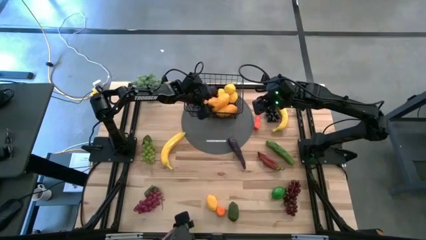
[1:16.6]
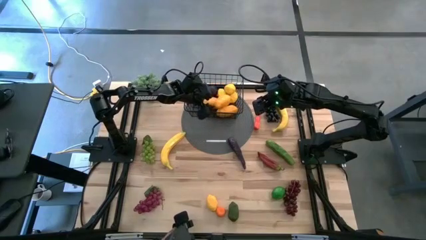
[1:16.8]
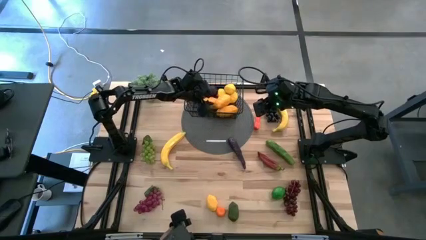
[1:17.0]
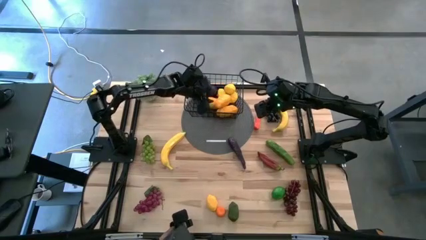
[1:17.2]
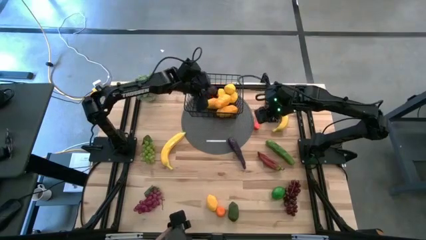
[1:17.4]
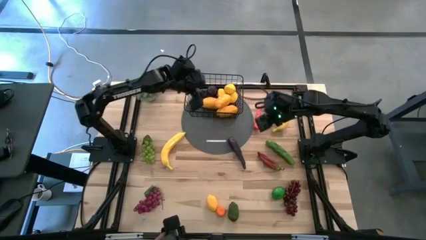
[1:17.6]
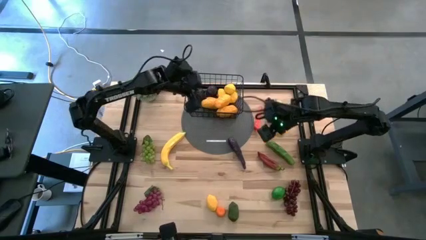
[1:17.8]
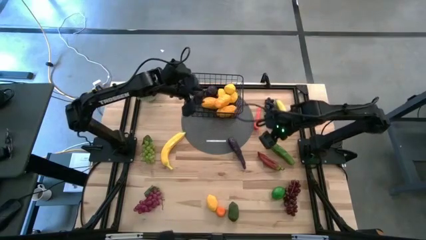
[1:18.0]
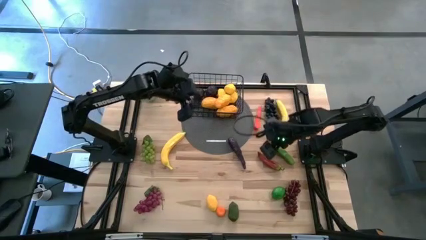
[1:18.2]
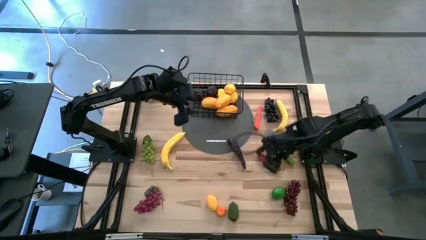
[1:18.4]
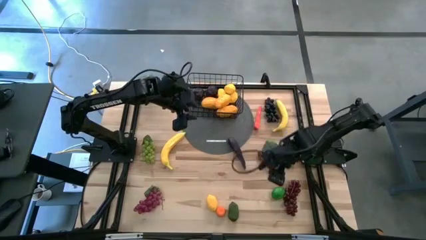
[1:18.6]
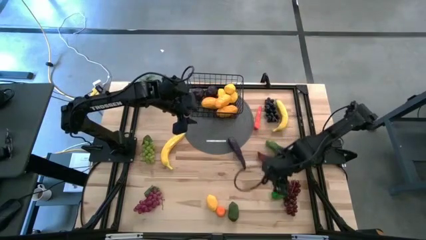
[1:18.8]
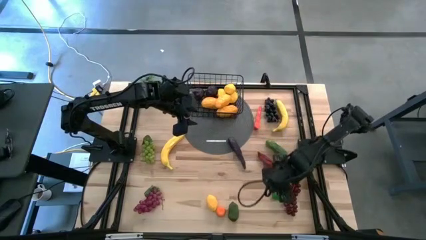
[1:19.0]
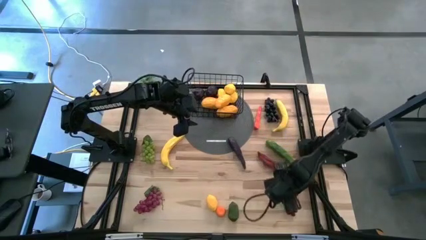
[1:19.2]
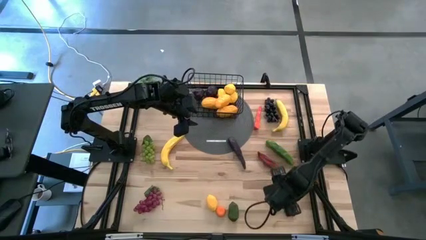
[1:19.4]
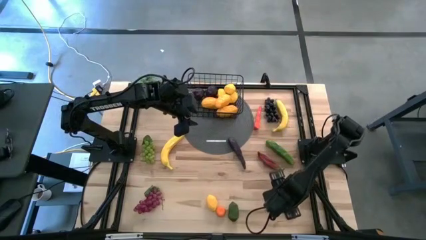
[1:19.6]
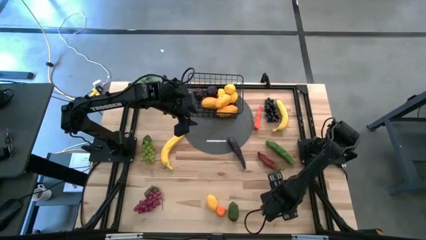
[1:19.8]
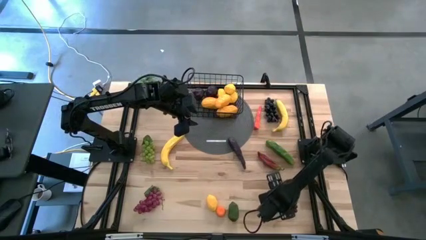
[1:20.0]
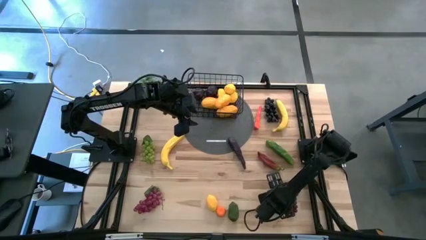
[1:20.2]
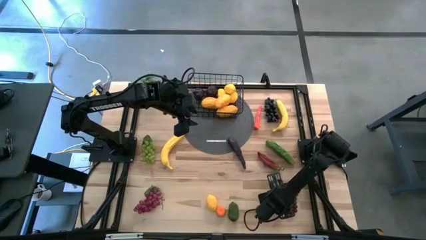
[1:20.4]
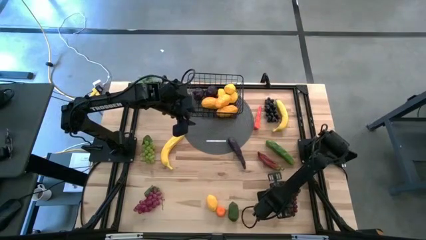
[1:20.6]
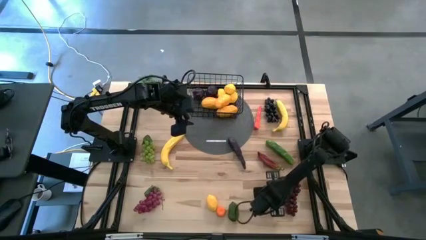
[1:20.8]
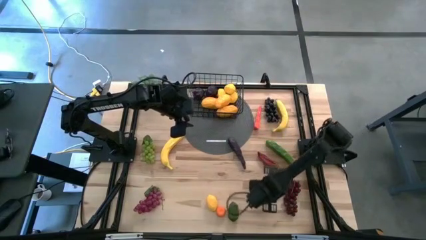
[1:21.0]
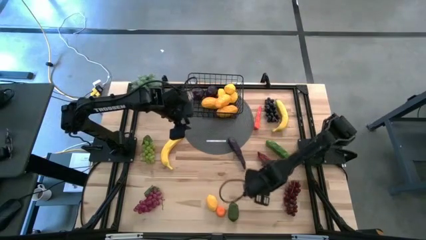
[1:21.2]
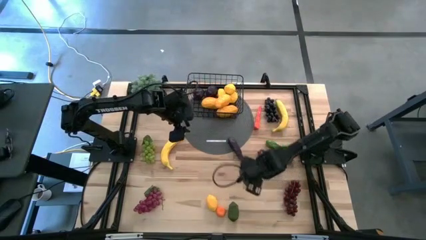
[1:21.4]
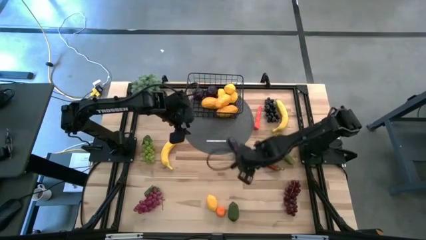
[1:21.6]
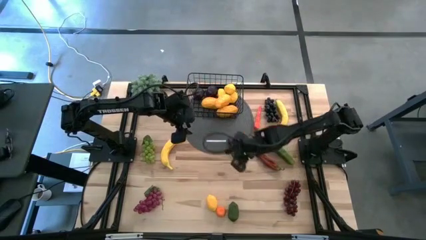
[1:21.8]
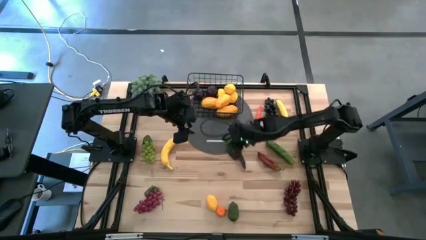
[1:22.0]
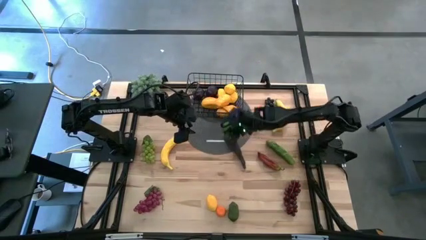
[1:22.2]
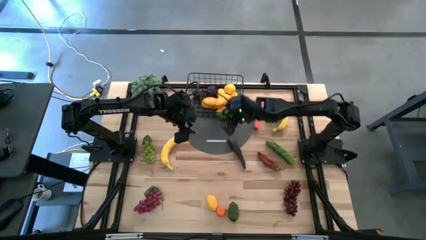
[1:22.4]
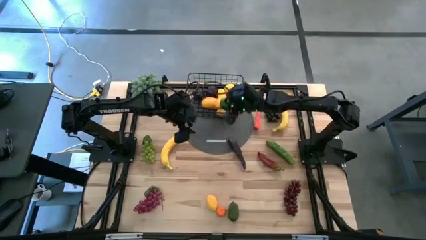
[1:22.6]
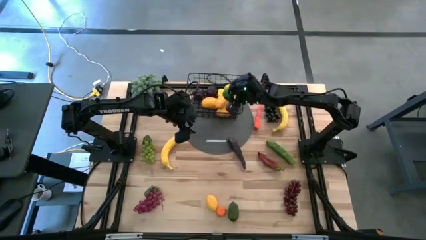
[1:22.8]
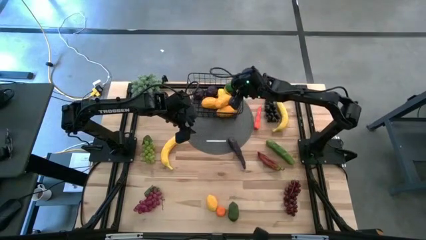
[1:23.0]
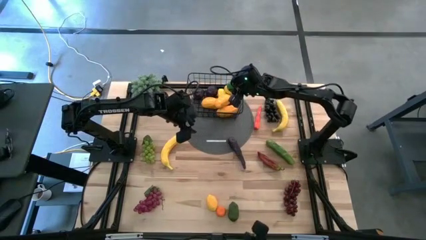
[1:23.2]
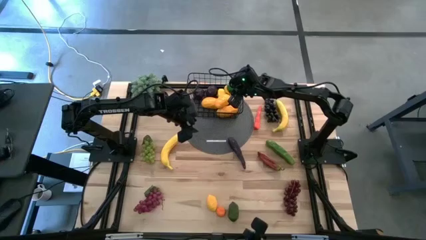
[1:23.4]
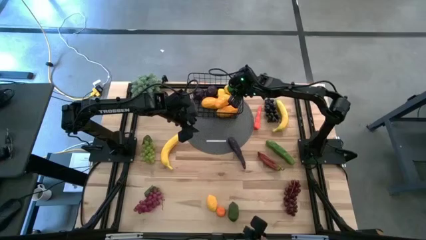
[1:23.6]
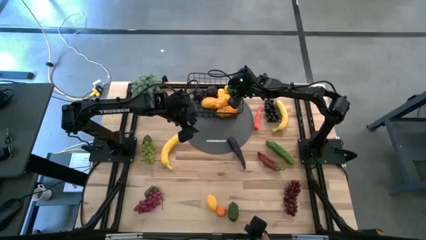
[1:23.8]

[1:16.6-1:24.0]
Task: Build produce basket
Put the lime into the black wire basket

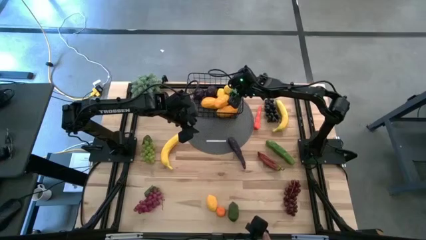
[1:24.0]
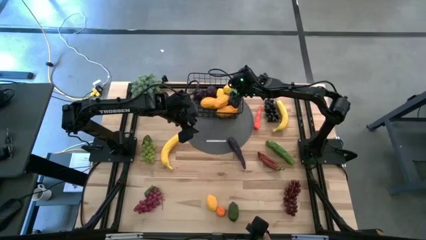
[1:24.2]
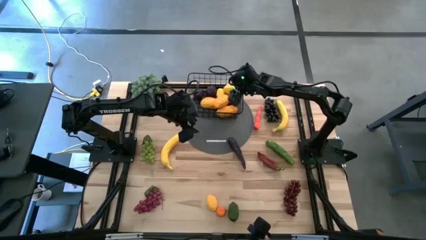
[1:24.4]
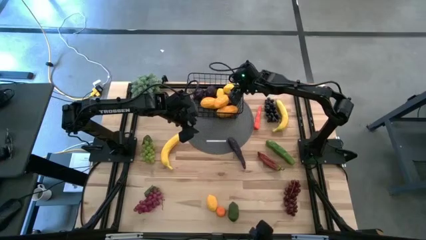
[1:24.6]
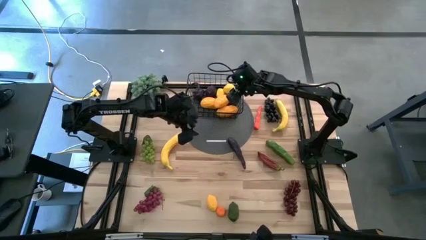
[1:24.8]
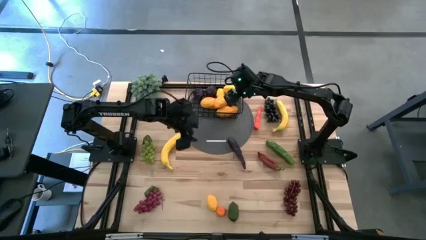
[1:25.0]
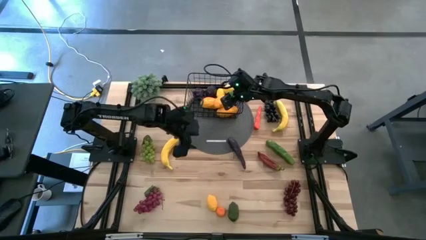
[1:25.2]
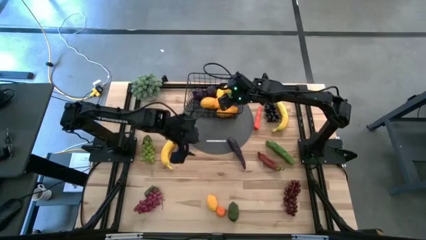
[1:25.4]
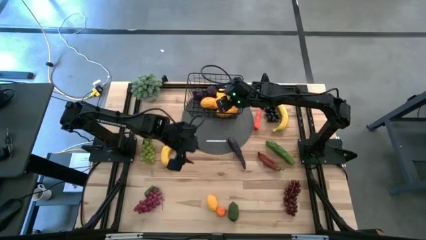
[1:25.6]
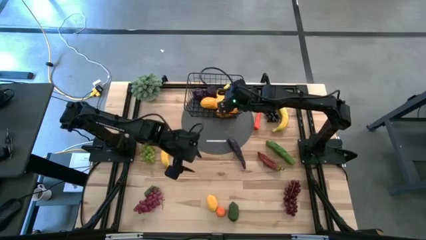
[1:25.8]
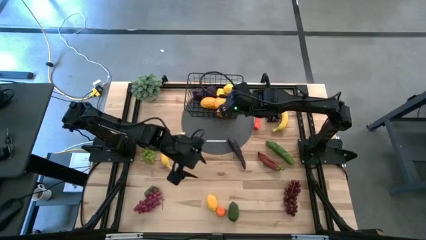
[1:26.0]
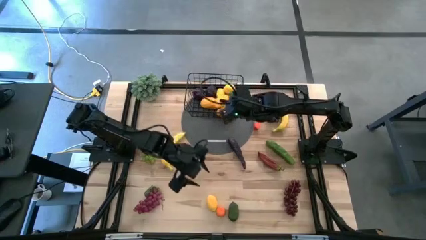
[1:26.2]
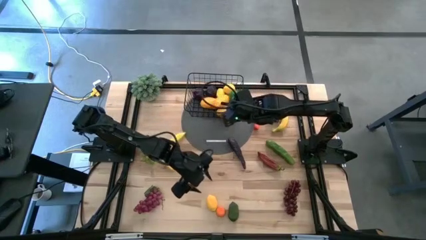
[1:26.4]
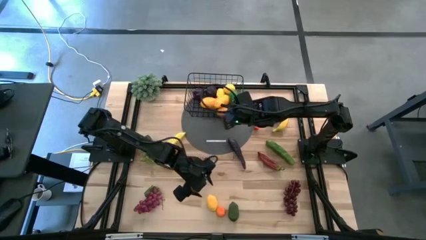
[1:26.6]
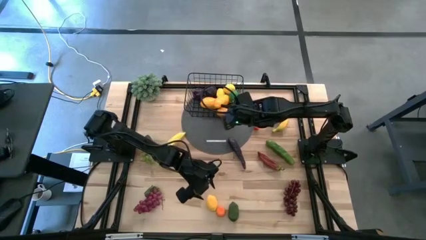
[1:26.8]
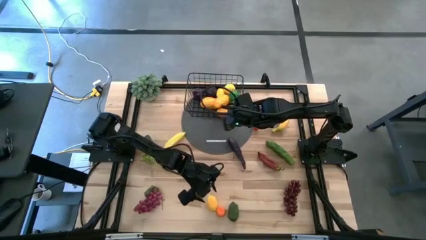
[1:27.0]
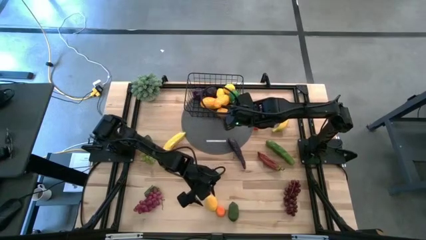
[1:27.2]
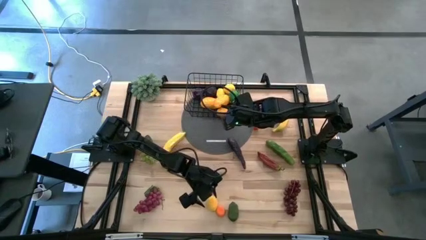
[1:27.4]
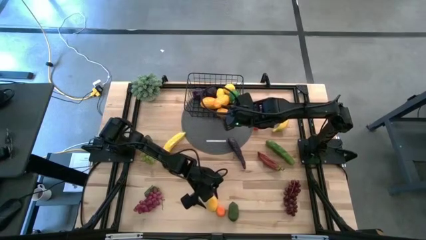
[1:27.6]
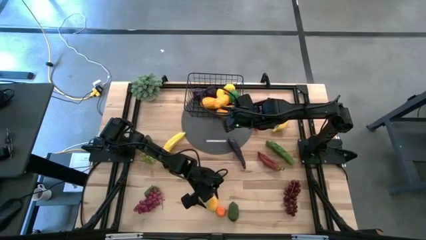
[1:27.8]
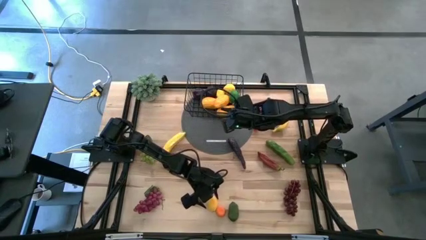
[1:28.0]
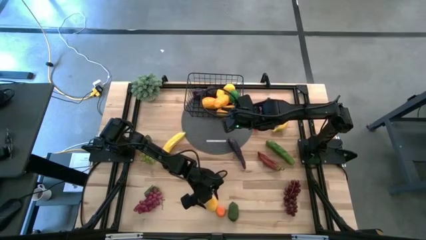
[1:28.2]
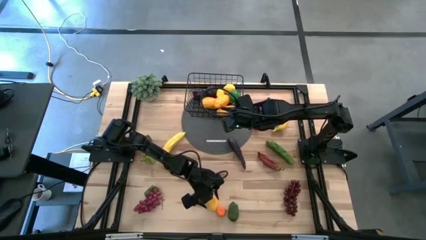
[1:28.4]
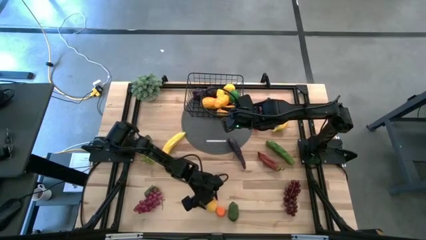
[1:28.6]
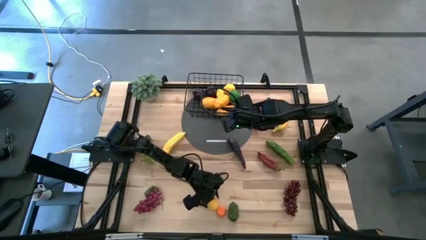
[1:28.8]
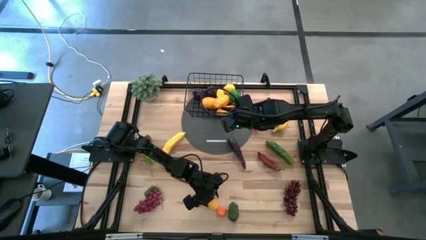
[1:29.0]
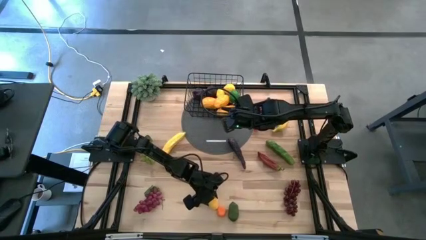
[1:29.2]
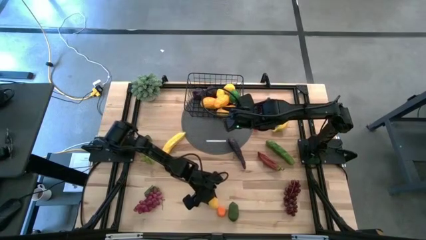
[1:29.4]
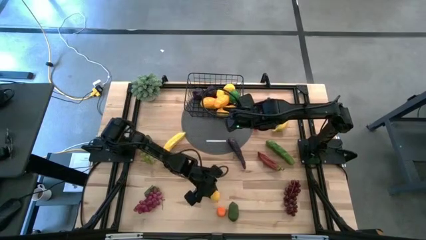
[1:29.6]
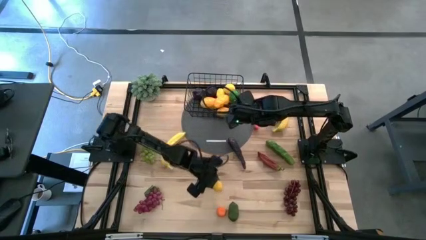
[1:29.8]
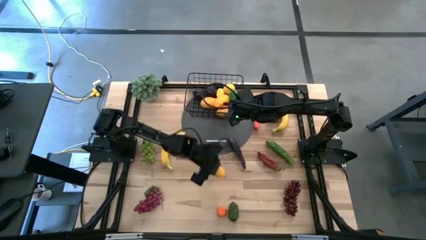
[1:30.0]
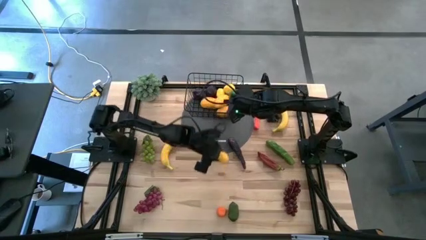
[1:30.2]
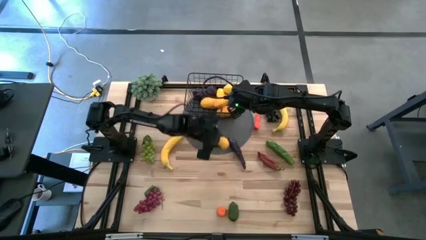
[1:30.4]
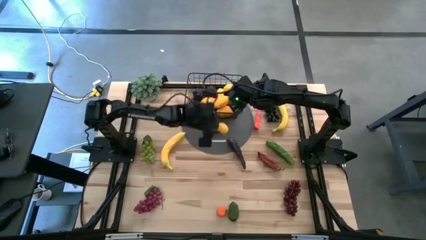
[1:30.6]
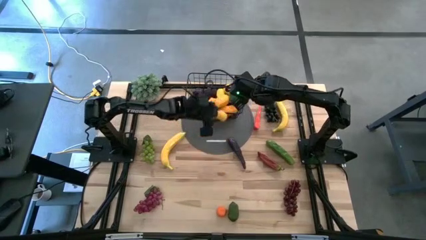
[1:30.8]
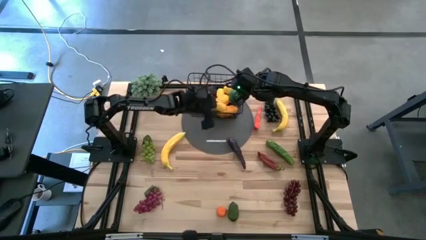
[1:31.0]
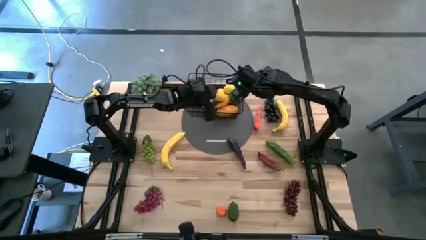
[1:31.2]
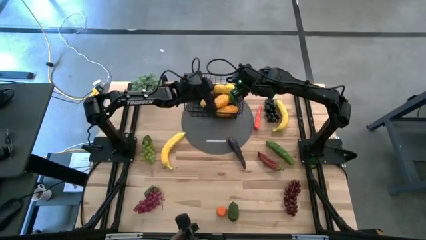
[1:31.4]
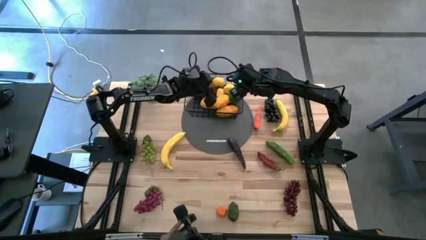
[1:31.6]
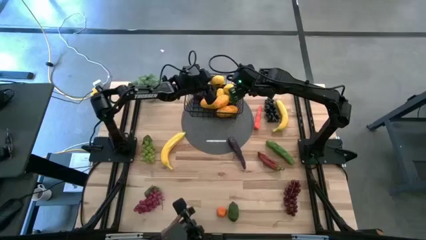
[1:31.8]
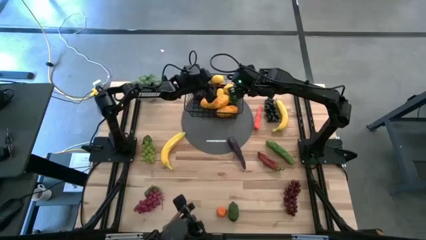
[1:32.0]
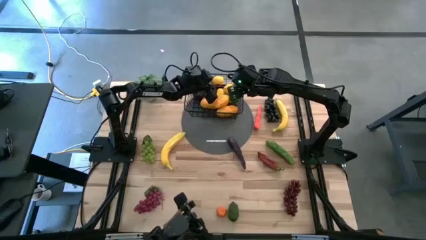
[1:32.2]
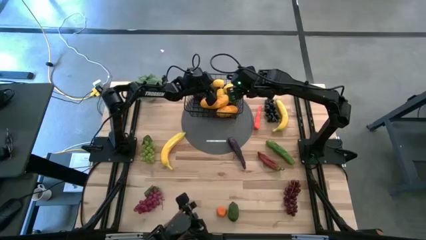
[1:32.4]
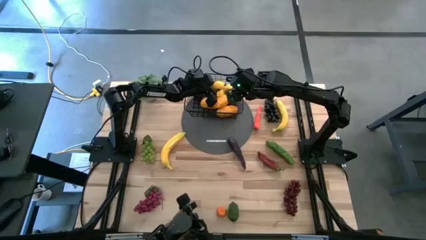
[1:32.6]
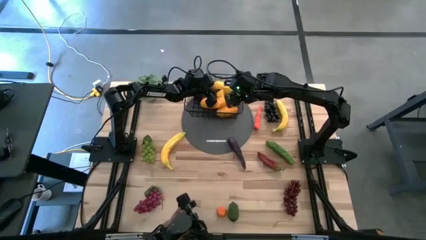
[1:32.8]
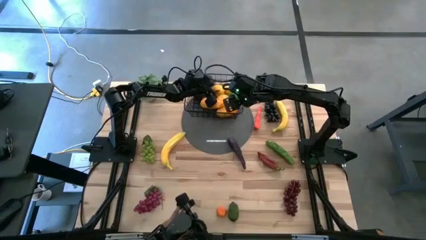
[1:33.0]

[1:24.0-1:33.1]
Put the lemon into the black wire basket
